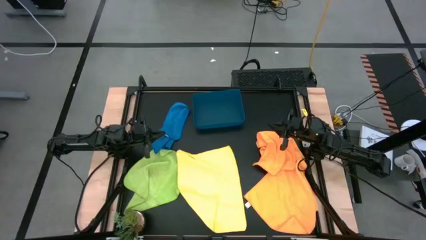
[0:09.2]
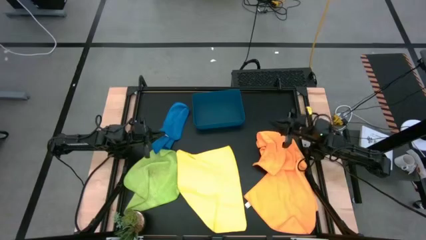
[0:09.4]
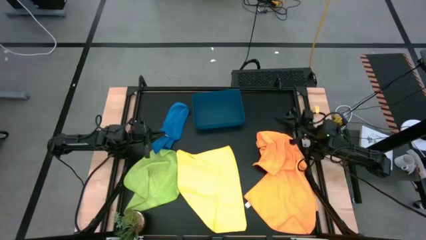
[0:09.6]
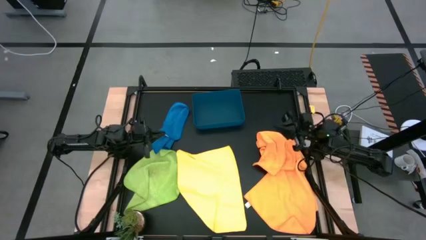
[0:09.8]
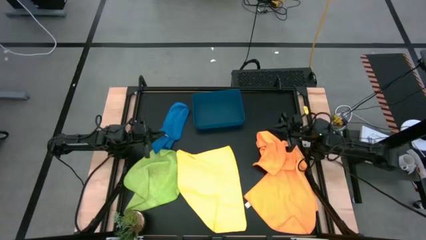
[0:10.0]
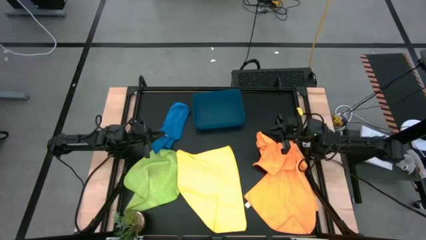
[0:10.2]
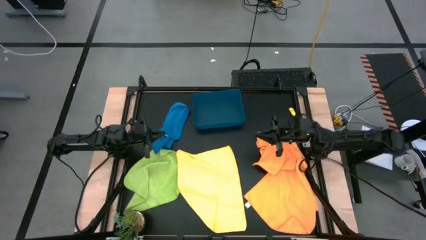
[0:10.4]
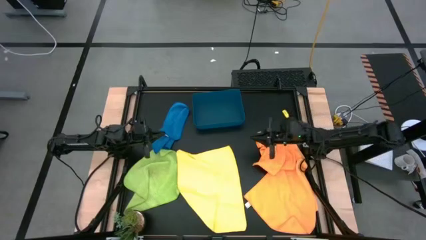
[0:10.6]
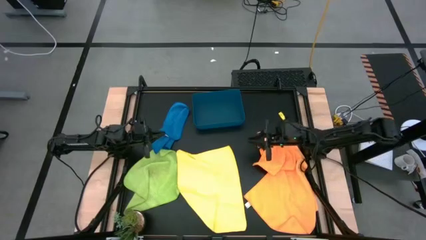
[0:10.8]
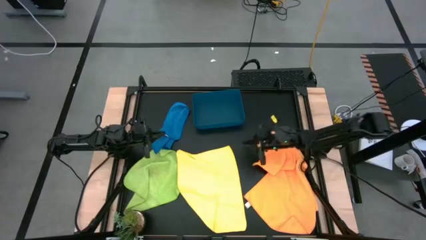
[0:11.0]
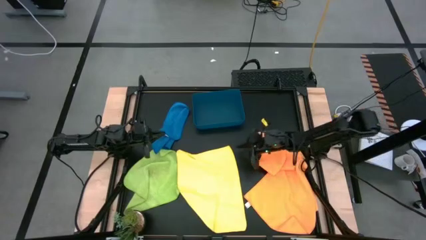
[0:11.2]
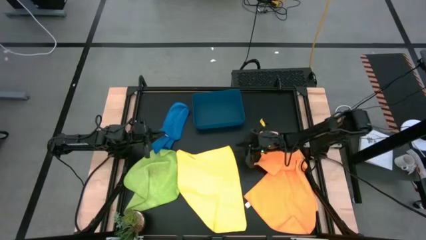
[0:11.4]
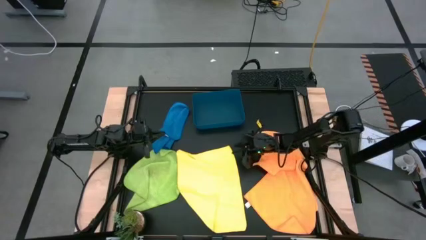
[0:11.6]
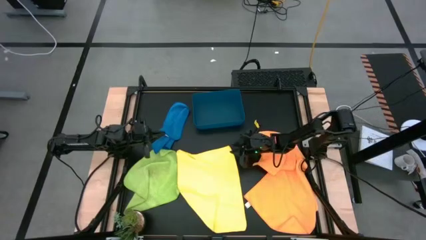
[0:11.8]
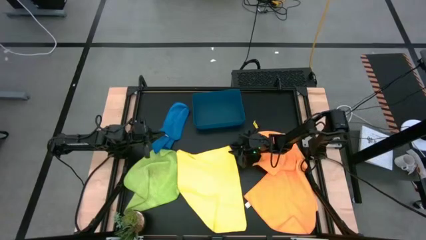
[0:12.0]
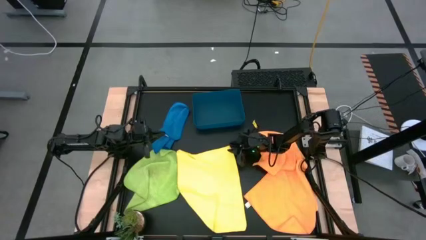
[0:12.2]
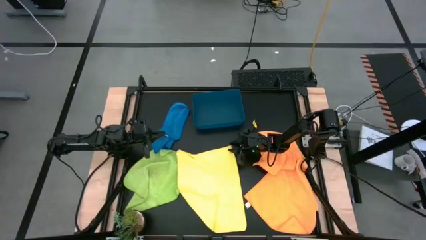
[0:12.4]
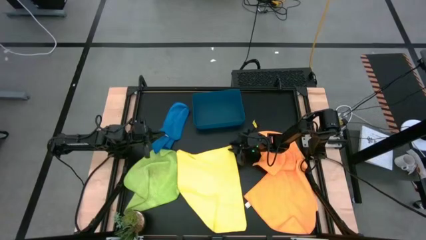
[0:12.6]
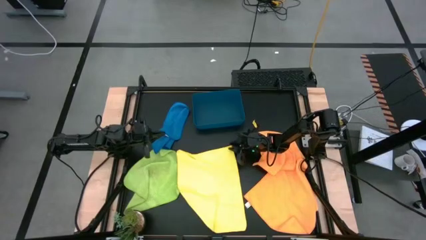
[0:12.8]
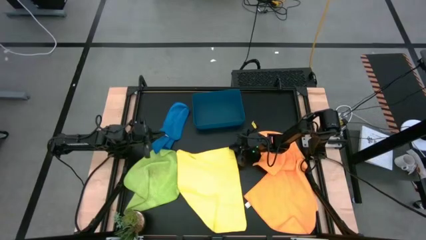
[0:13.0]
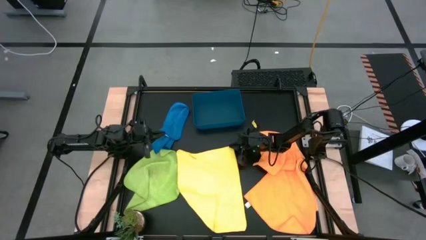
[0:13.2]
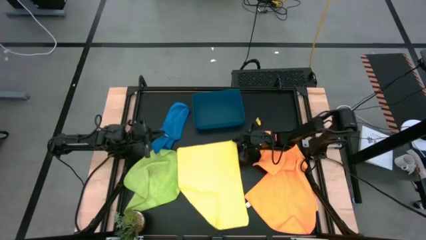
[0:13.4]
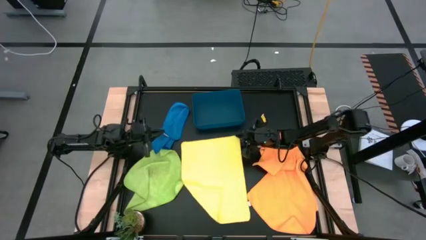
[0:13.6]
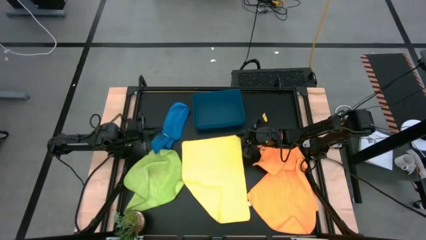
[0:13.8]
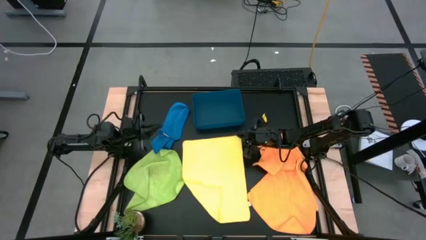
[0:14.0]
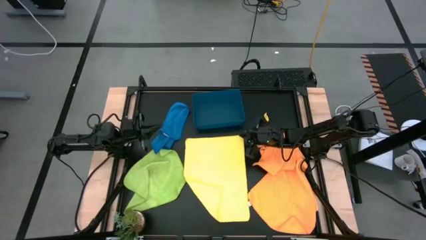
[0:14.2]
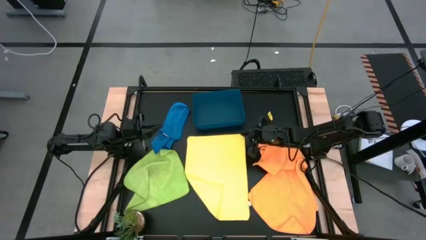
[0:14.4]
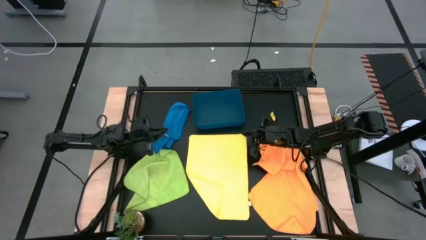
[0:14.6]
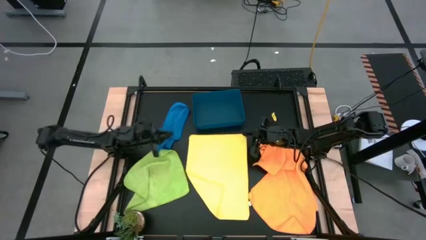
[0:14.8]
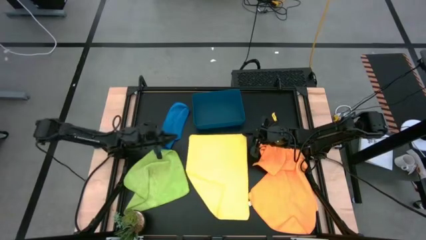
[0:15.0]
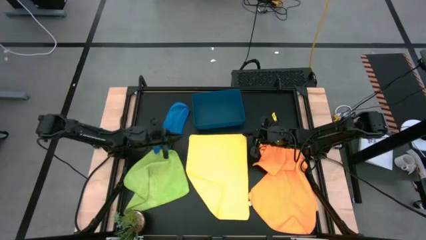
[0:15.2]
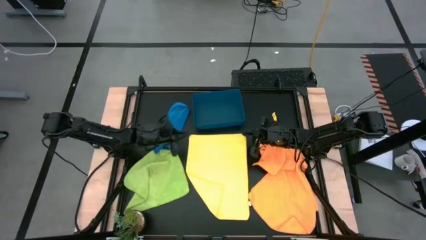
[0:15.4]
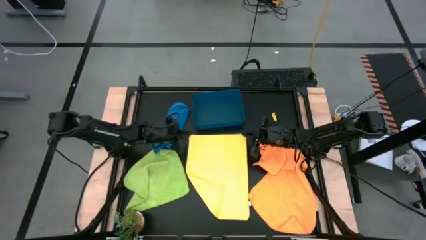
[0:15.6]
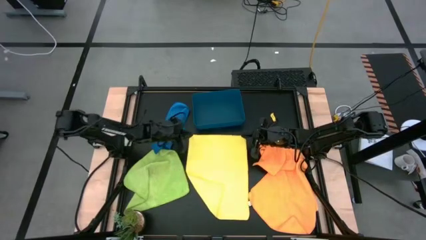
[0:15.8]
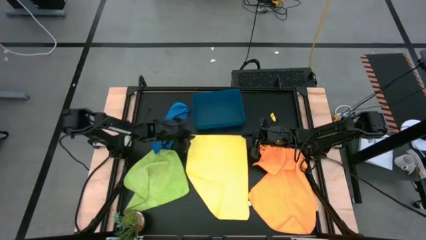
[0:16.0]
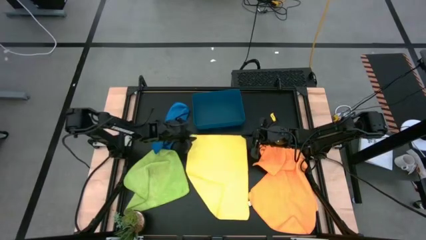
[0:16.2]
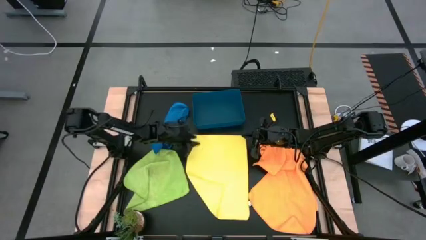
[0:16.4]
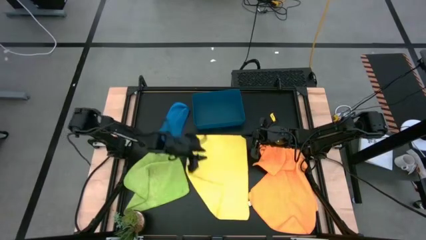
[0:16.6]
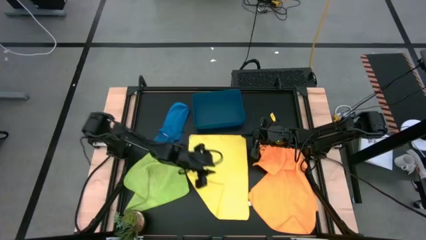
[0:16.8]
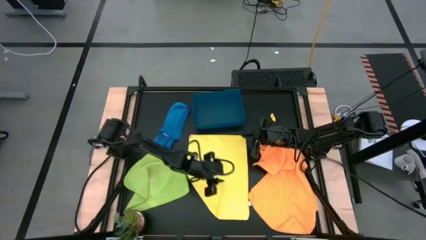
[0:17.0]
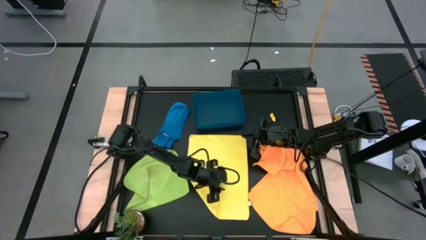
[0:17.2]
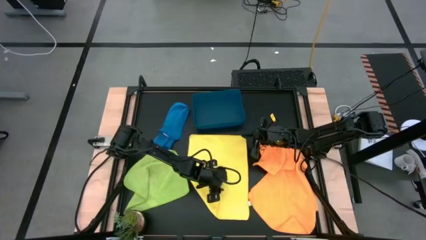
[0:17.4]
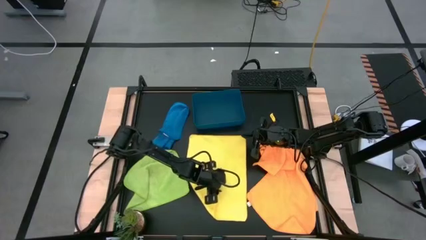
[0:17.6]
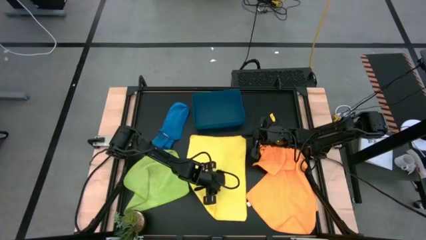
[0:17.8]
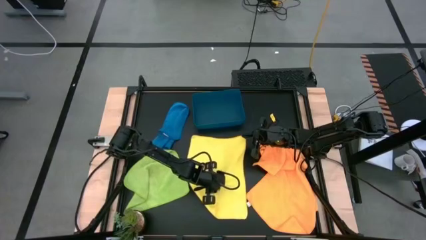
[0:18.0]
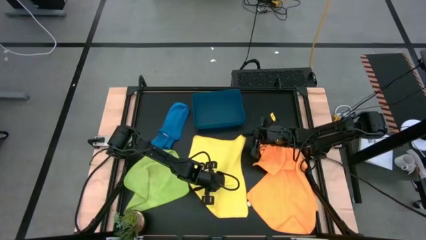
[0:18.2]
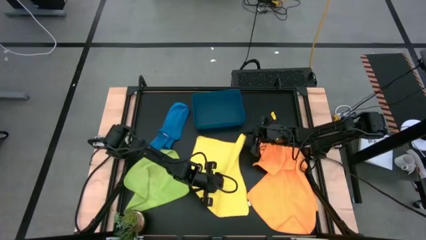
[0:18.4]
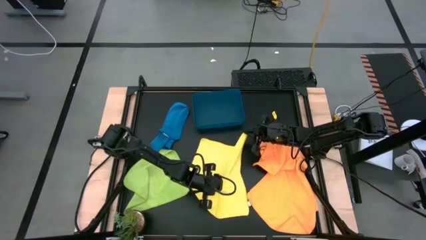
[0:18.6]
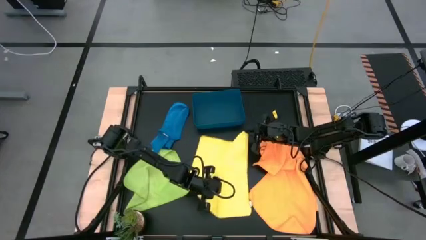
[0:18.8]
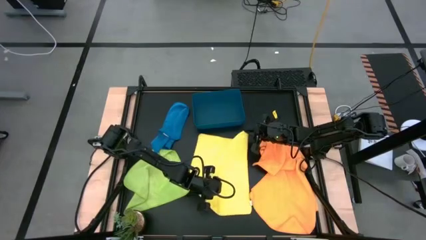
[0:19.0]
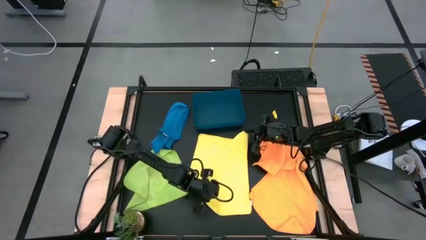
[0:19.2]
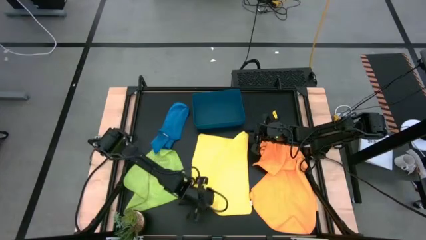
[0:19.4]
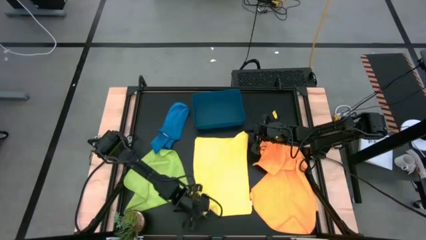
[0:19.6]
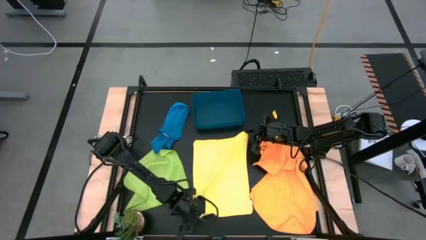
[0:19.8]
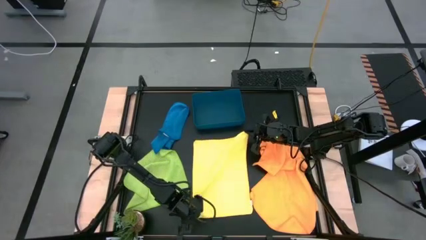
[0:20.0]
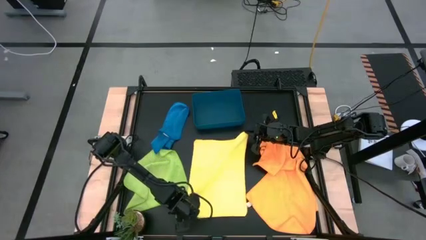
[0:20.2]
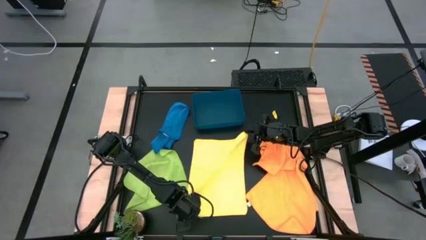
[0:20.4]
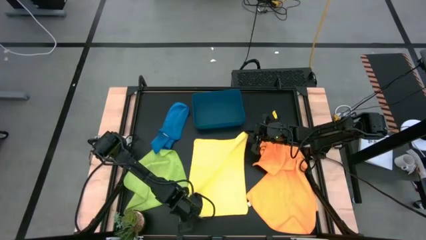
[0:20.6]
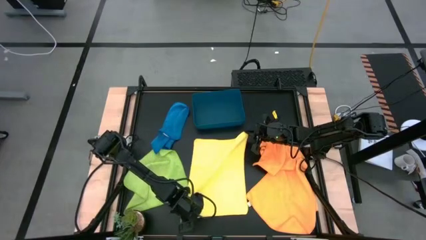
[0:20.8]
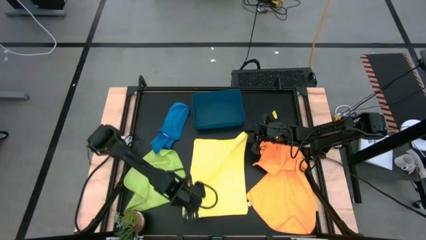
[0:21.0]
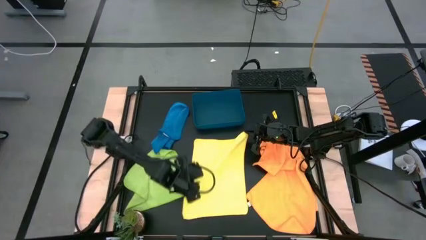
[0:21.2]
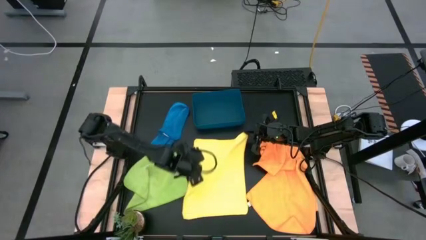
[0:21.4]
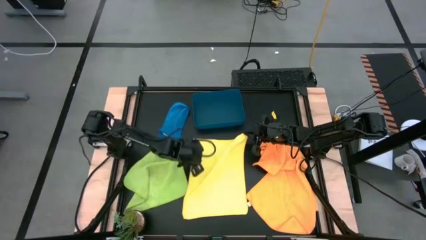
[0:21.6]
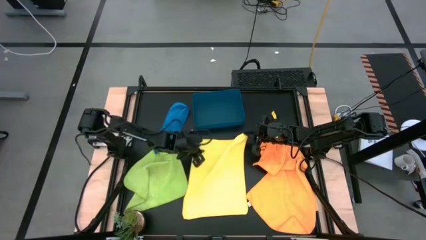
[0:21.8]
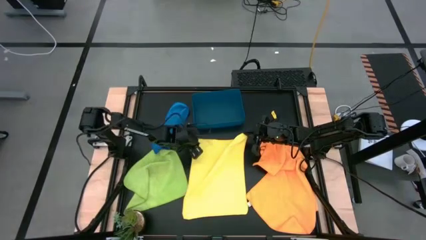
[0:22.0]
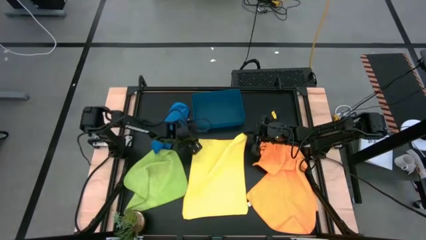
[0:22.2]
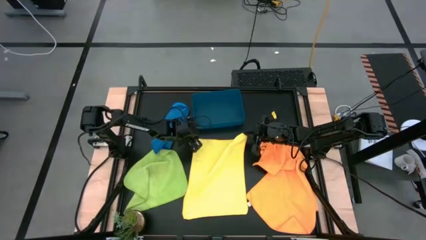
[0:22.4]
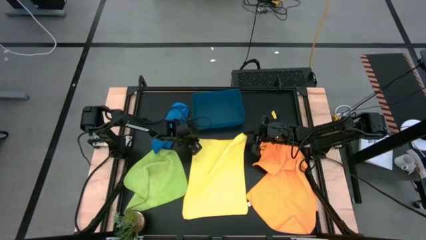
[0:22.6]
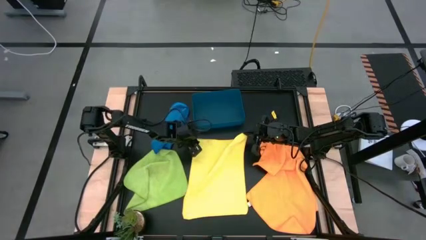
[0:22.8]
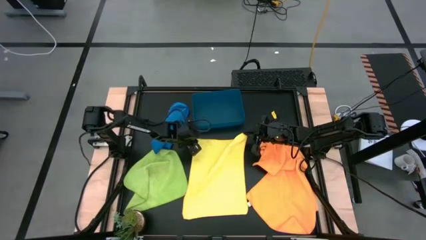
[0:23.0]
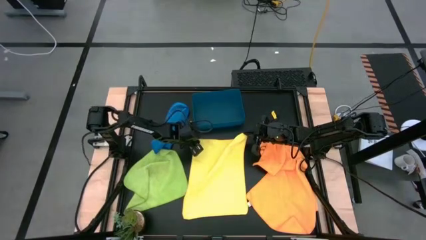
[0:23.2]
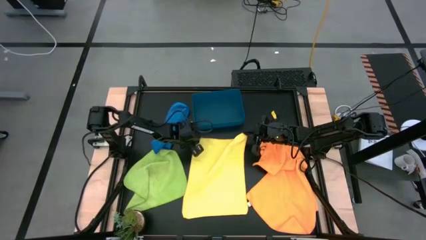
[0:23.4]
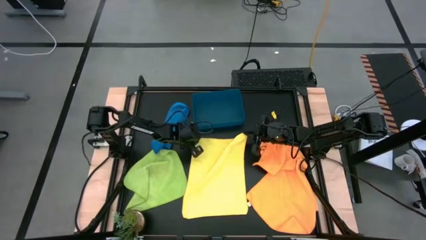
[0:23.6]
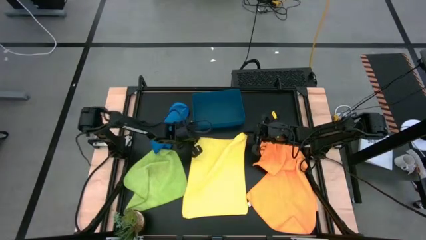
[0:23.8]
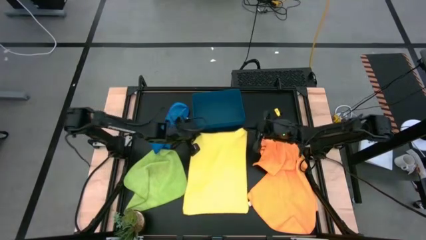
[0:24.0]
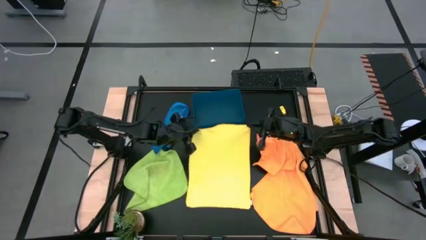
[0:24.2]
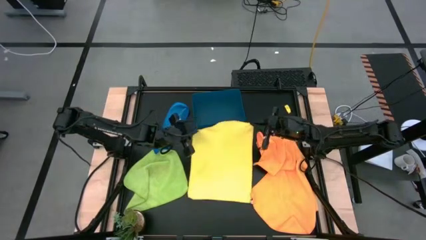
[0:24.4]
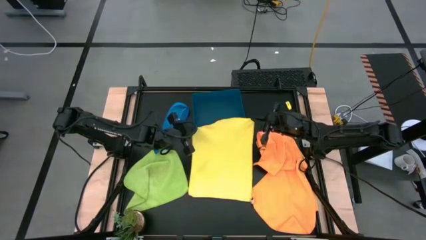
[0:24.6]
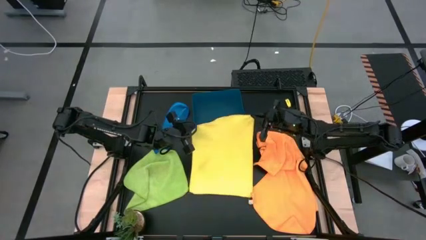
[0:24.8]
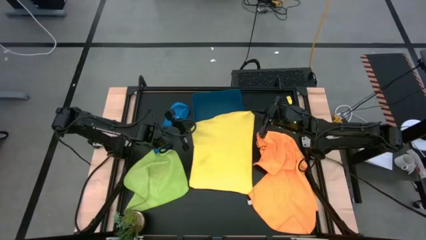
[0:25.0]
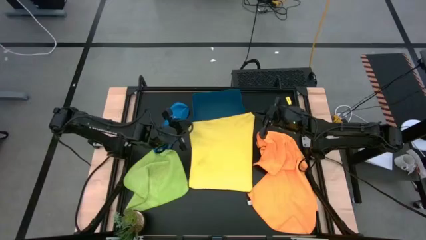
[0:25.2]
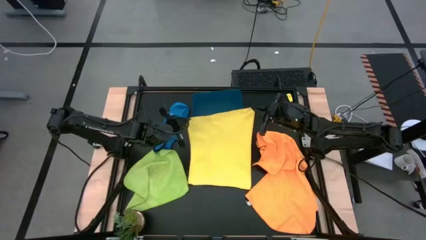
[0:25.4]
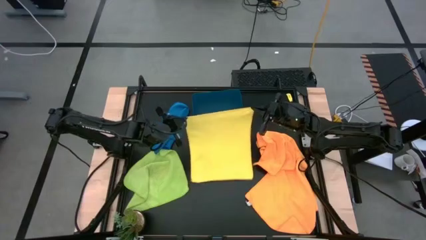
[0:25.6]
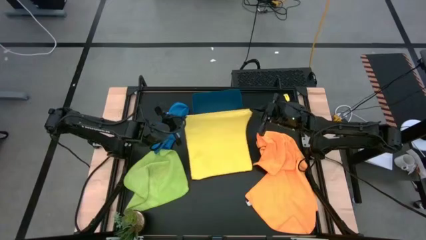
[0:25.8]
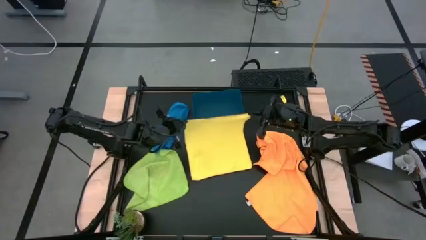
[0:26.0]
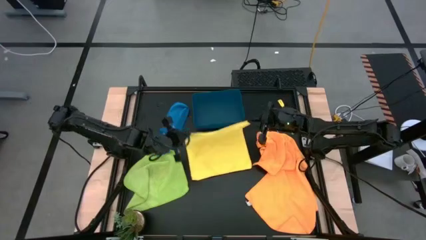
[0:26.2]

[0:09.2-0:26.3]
Task: Fold microfiber towels
Fold the yellow microfiber cloth
